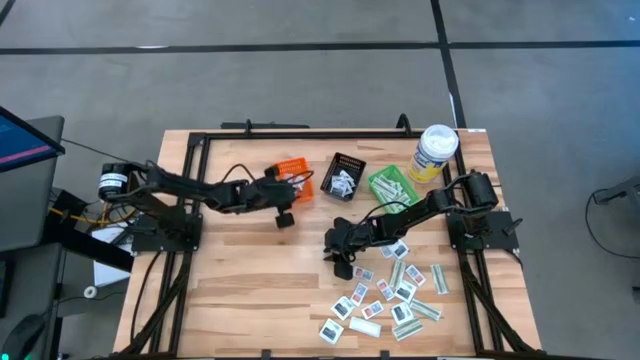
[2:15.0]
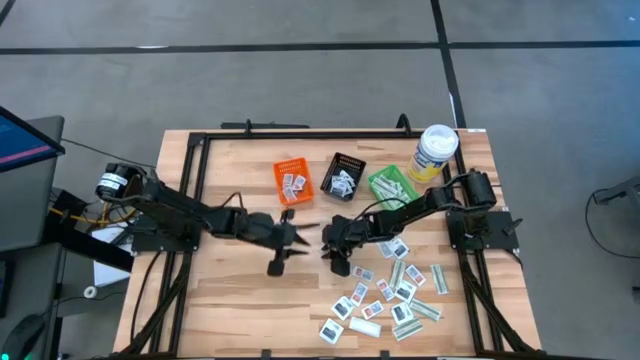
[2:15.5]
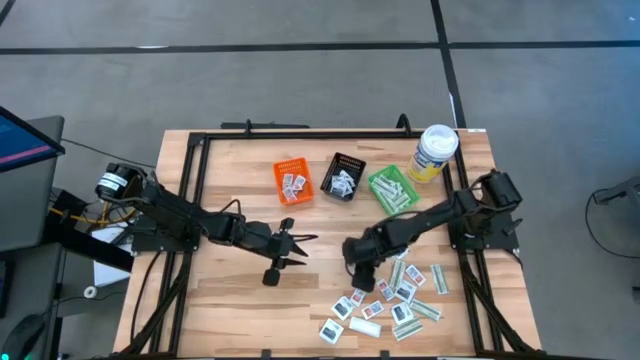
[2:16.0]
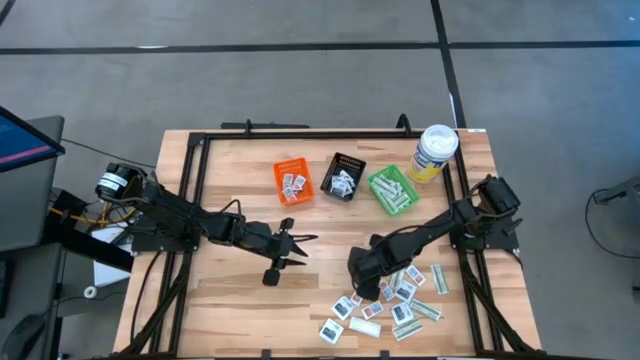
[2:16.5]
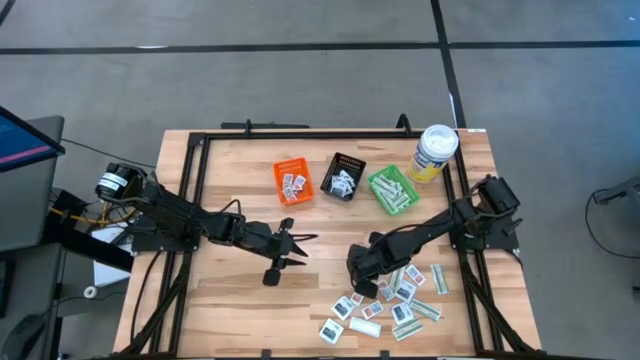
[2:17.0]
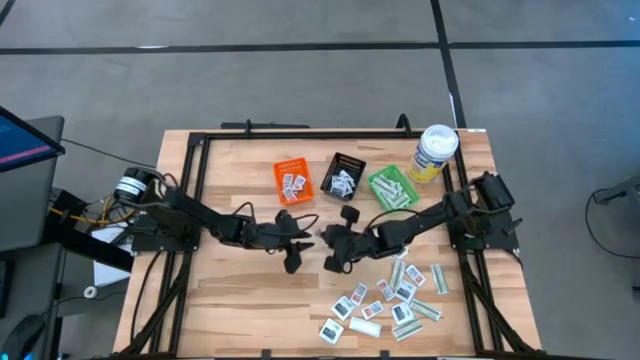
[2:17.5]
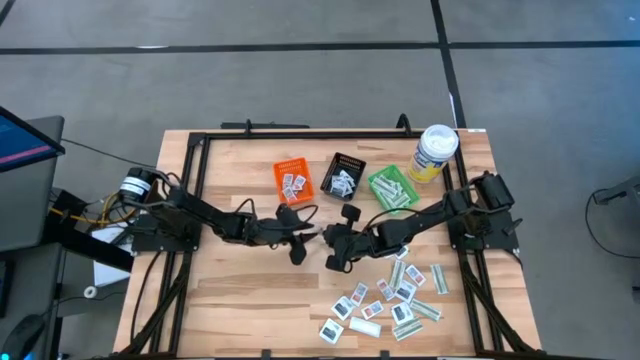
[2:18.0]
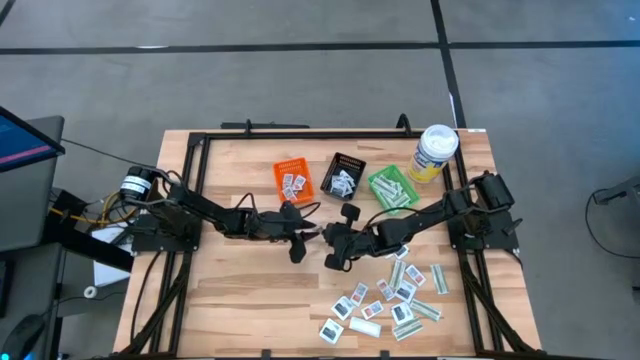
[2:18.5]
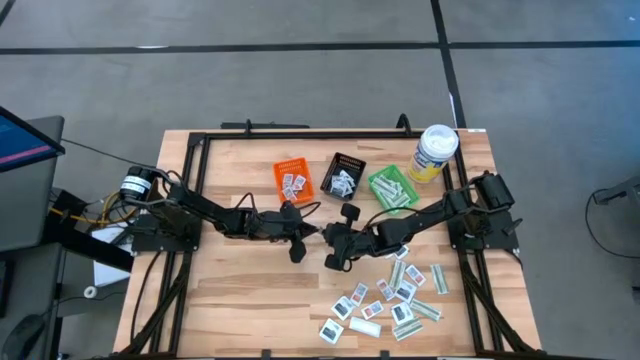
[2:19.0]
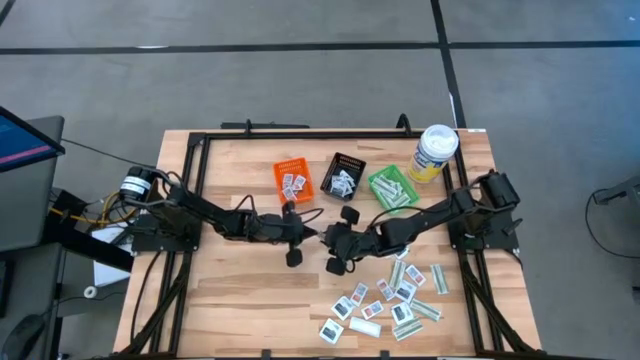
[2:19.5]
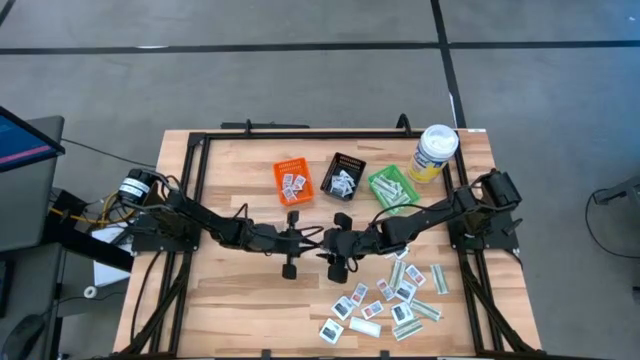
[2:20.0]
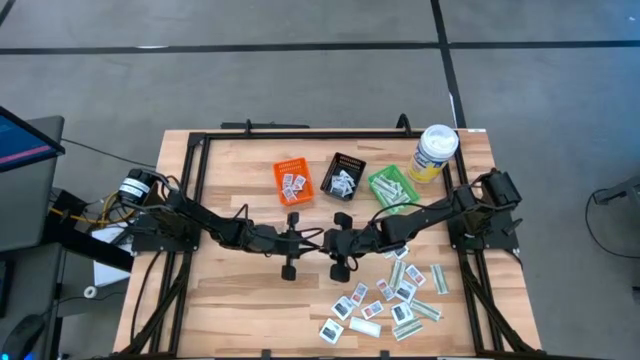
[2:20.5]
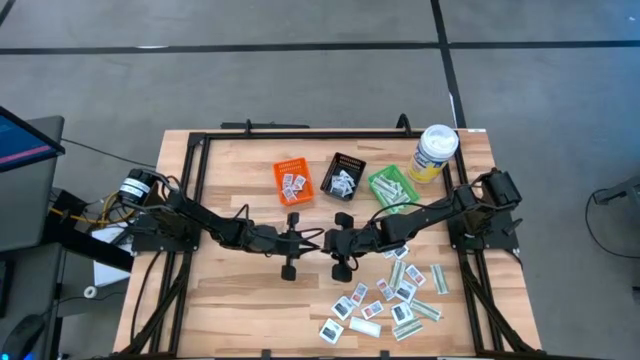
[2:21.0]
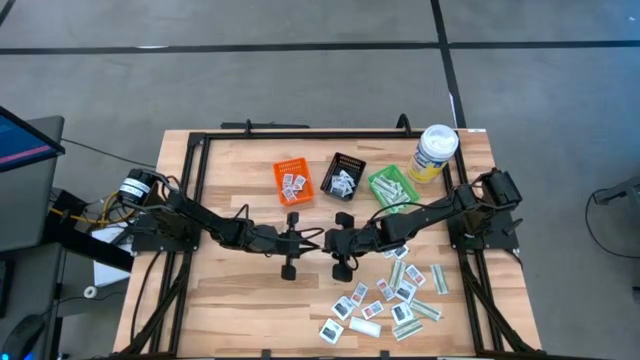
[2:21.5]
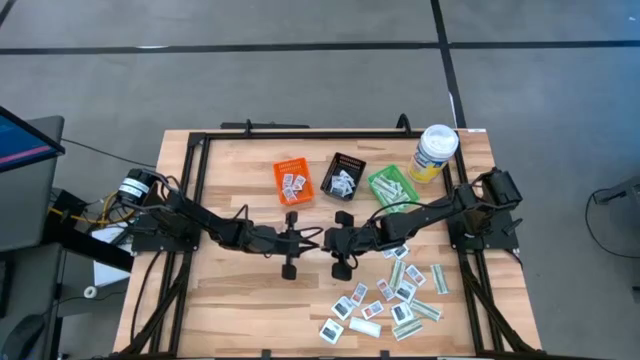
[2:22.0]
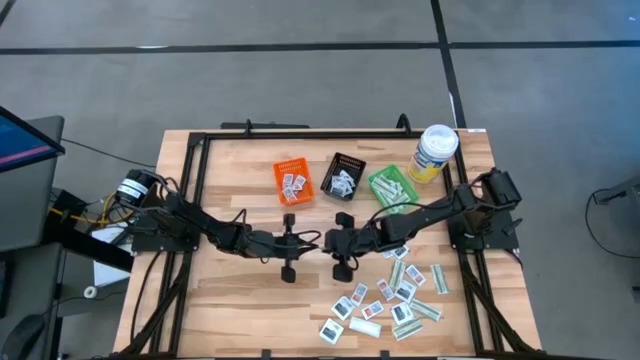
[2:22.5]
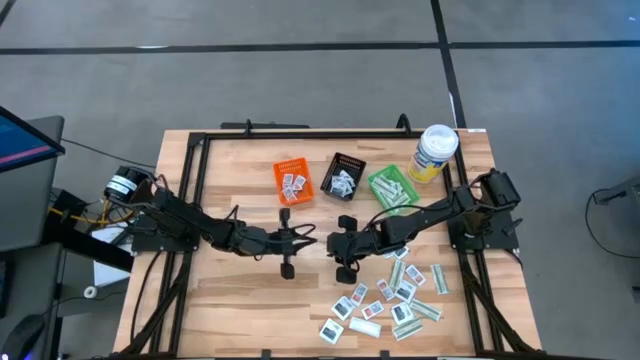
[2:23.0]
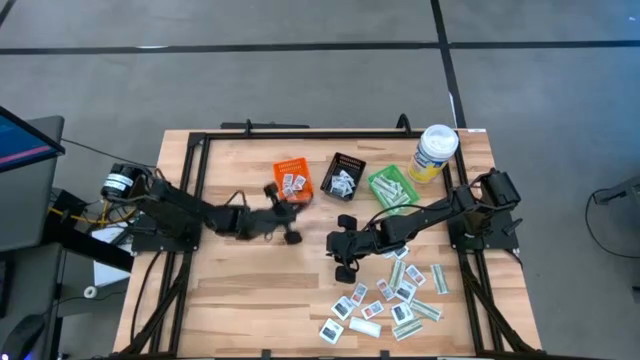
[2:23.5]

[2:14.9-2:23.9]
Task: Pick & Place First Aid Supplies
Put the orange ointment pack into the orange basket

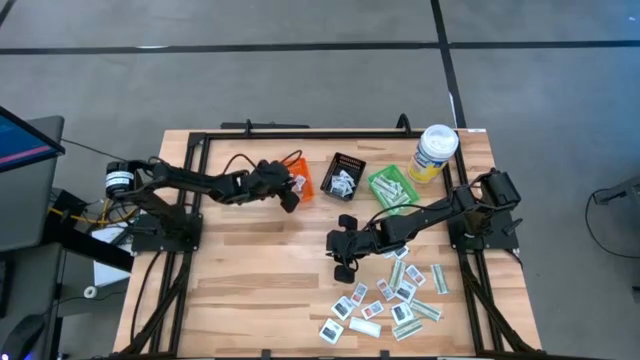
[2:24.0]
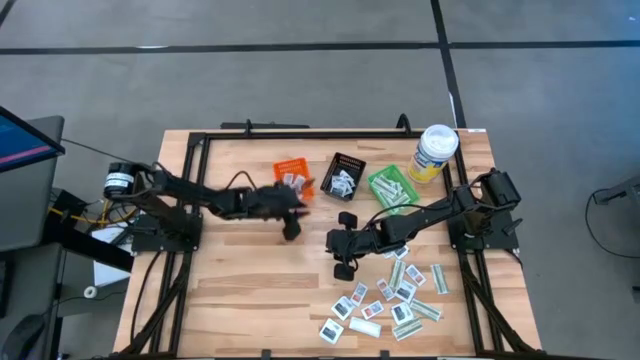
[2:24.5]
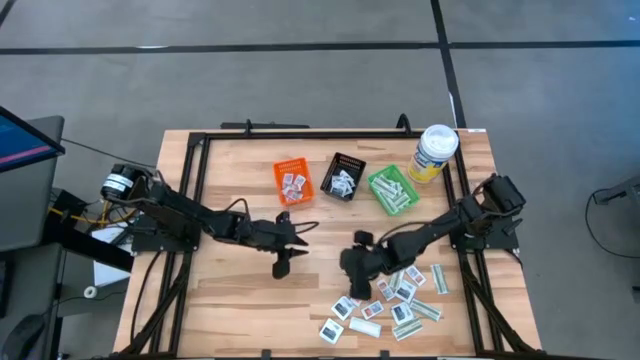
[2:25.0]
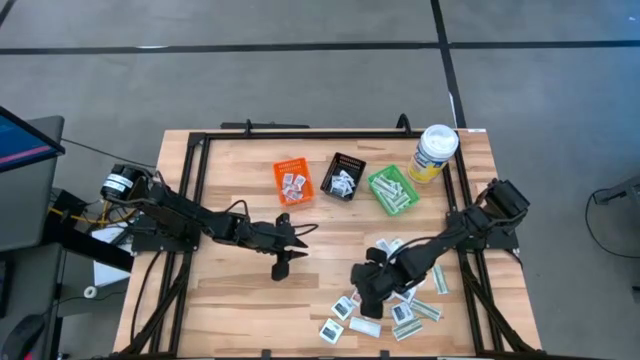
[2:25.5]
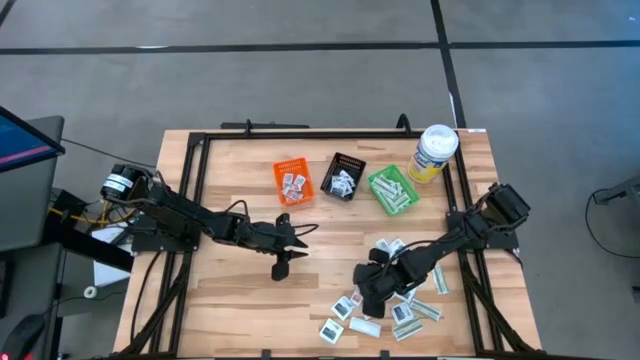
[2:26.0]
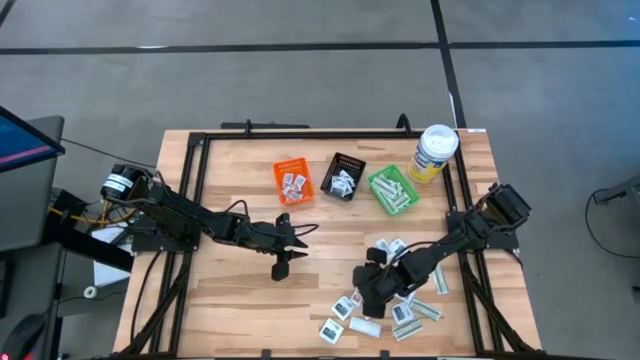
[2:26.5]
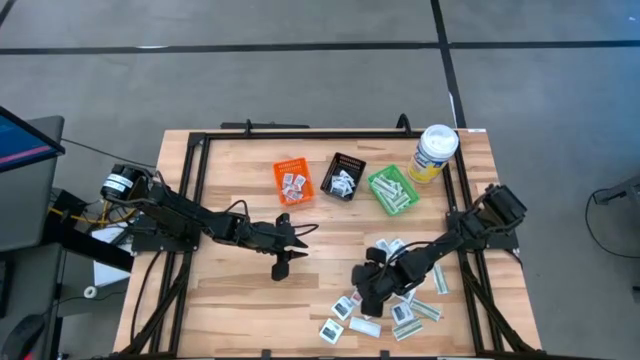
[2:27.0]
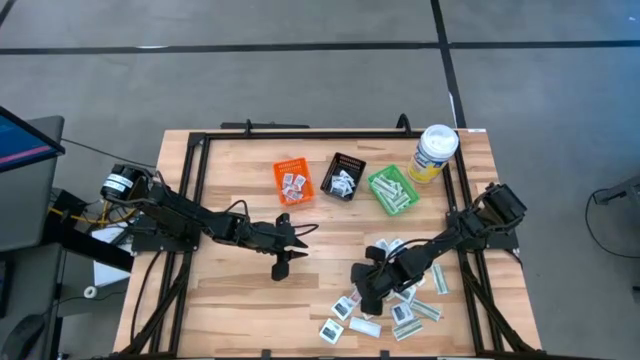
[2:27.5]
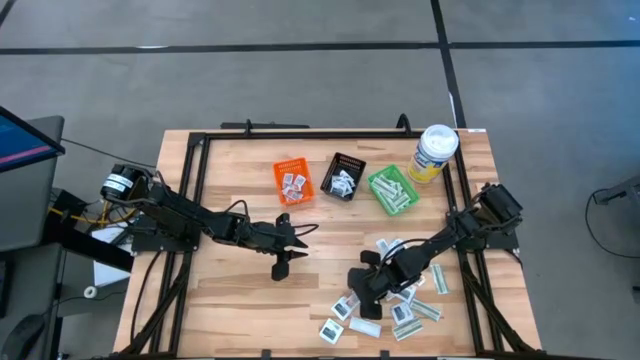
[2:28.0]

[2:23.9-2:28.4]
Put the orange ointment pack into the orange basket

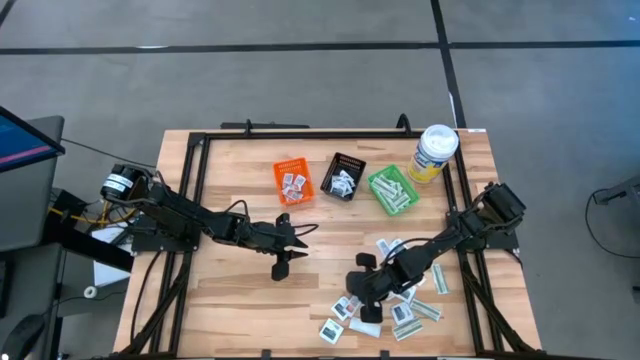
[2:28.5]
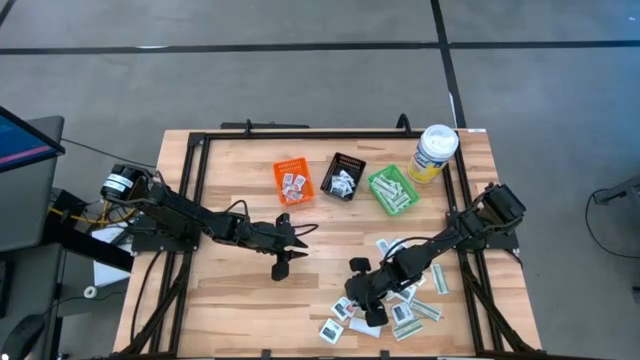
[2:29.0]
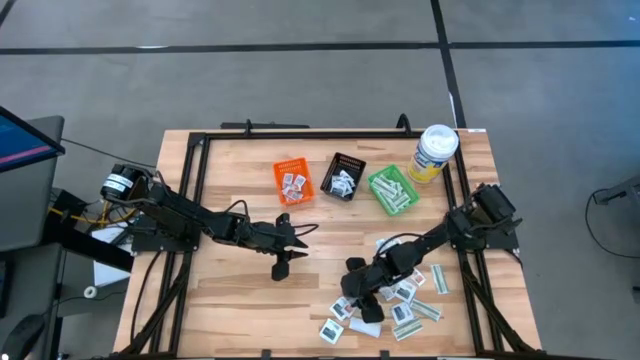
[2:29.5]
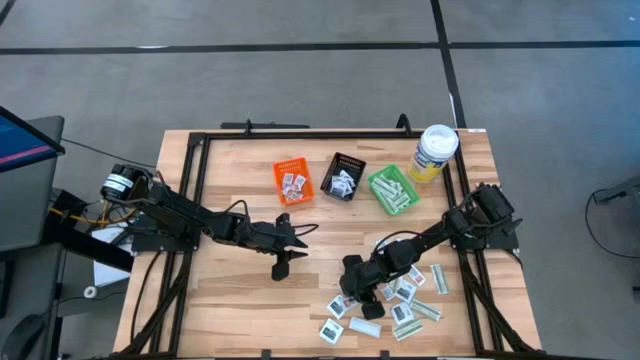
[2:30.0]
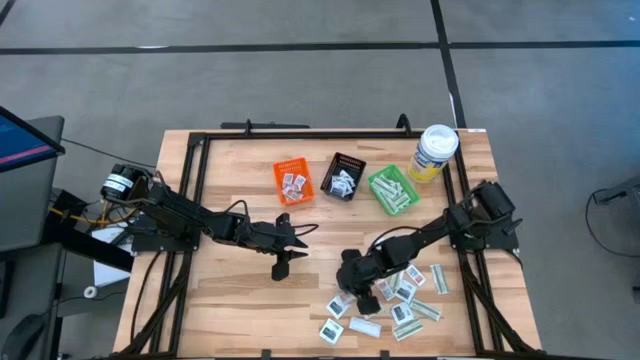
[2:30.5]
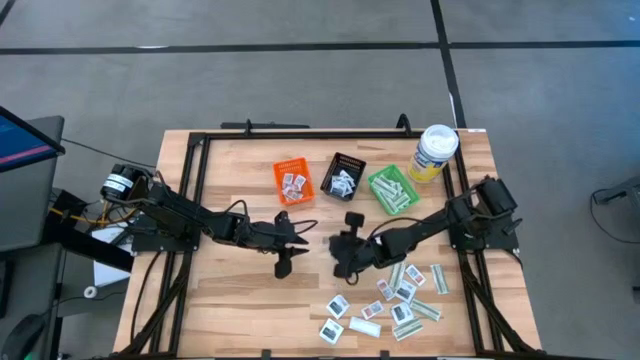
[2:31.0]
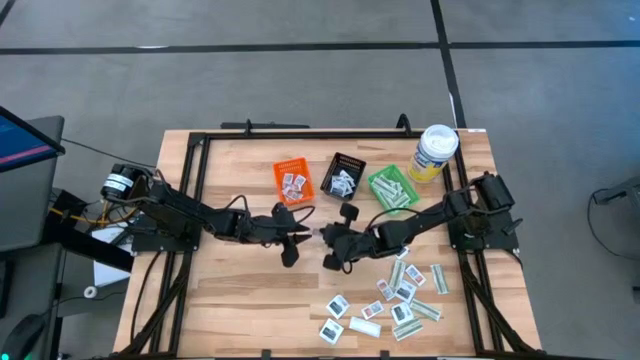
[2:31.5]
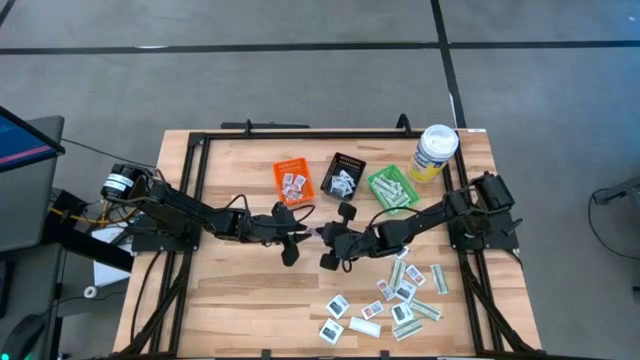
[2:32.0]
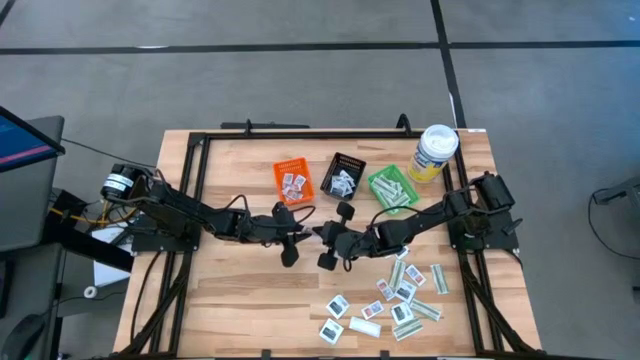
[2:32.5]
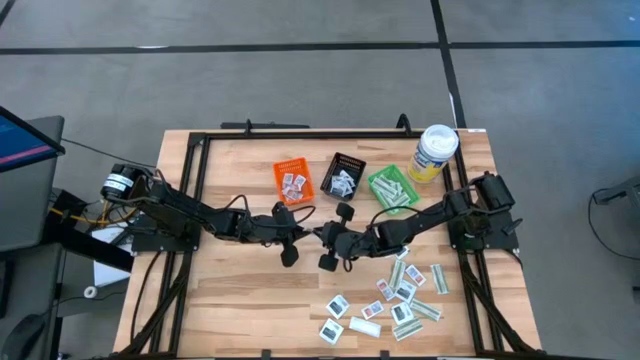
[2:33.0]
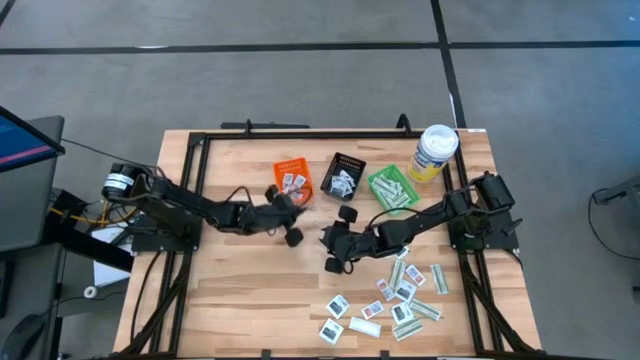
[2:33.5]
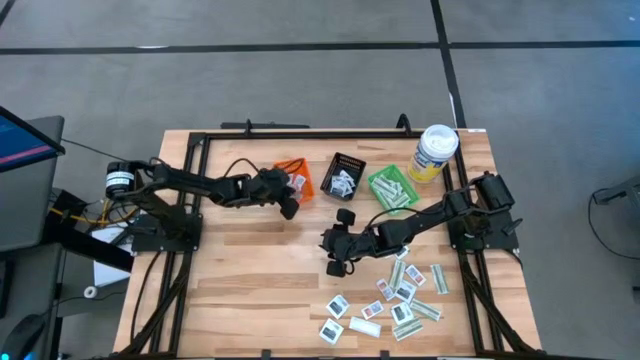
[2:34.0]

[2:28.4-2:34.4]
Put the orange ointment pack into the orange basket

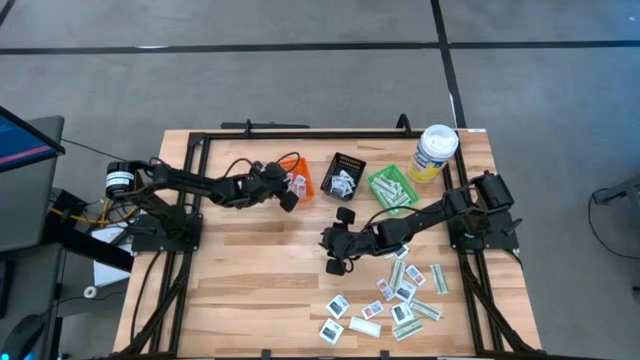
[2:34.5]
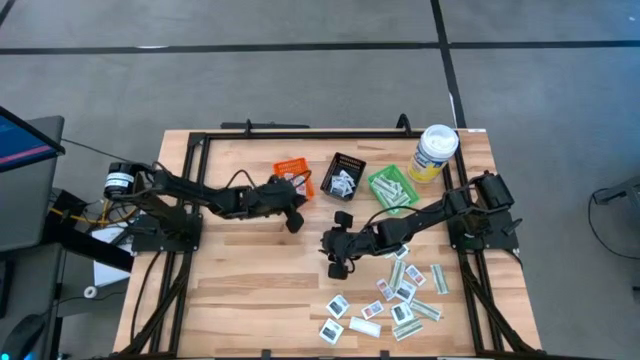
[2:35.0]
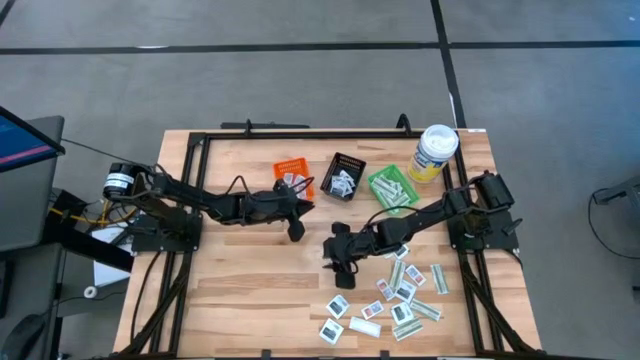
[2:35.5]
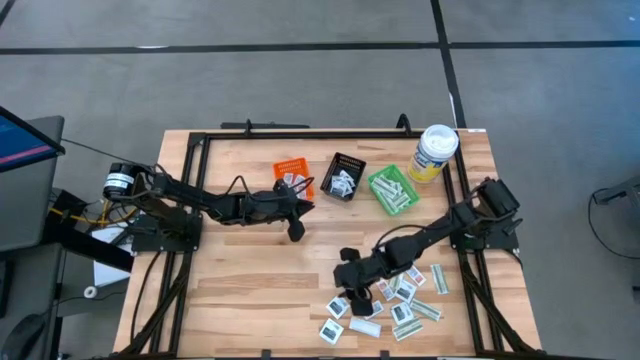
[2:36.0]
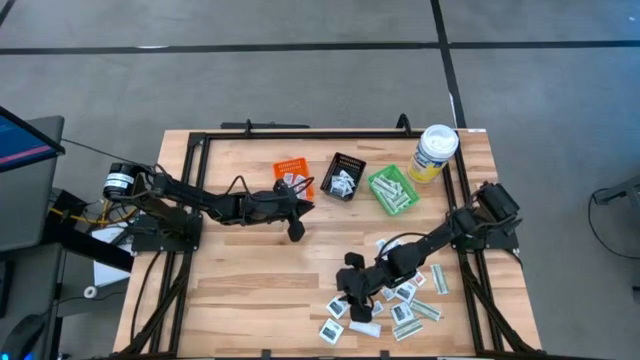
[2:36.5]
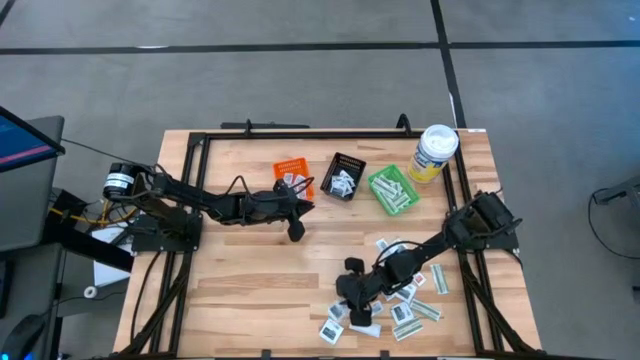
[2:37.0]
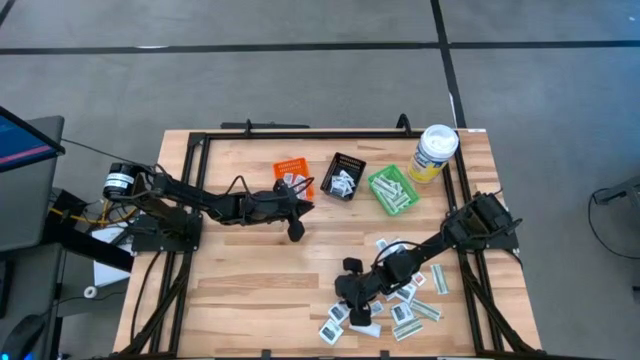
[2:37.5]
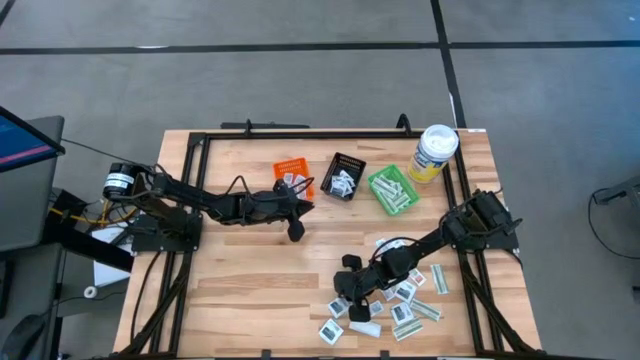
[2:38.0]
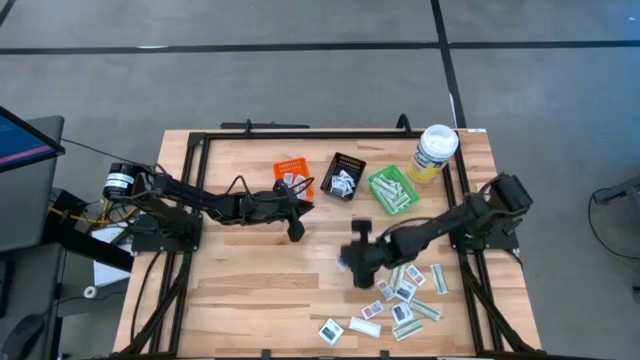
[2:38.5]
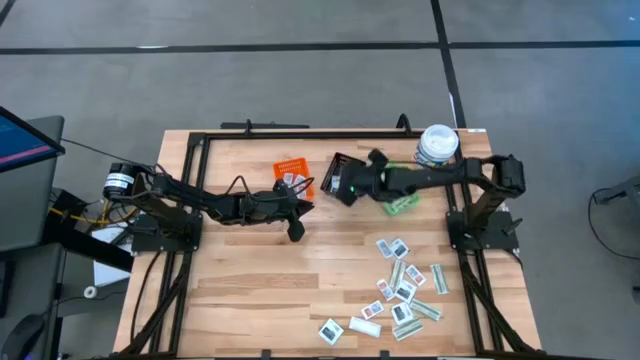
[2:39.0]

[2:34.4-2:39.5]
Put the black towelette pack into the black basket
